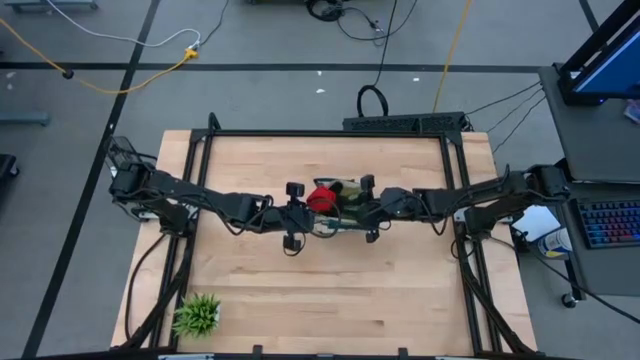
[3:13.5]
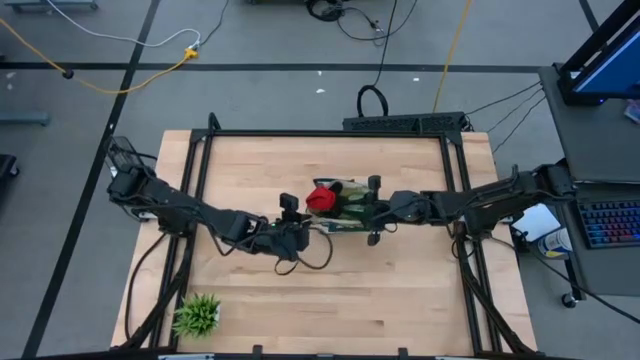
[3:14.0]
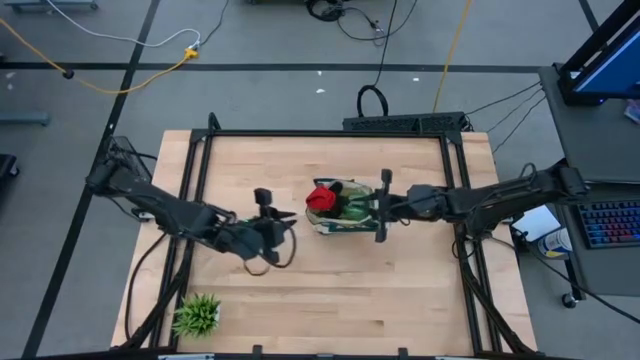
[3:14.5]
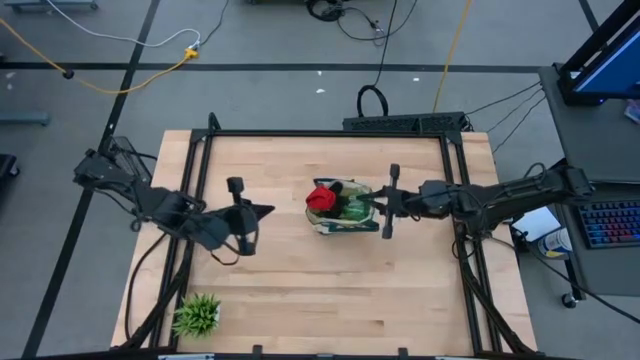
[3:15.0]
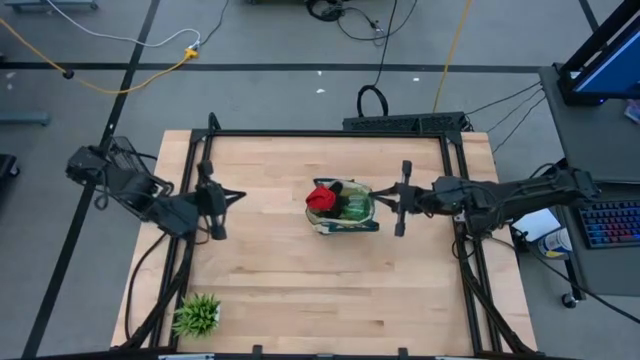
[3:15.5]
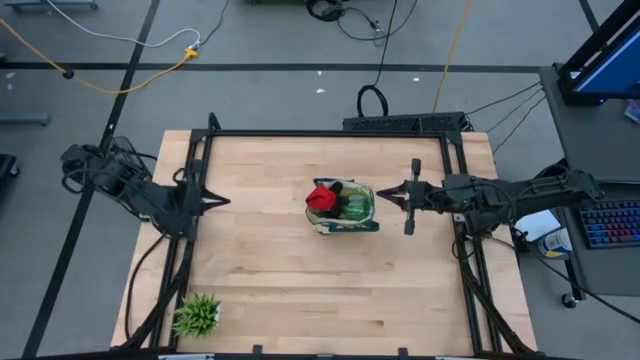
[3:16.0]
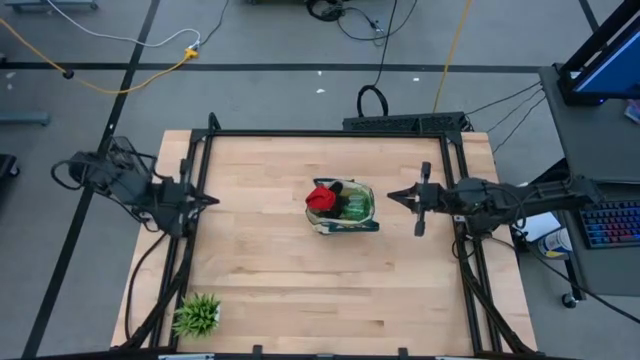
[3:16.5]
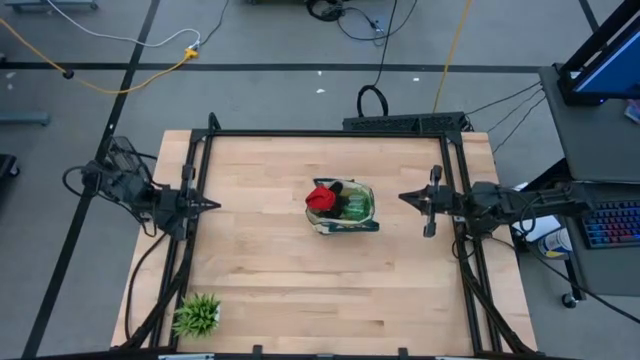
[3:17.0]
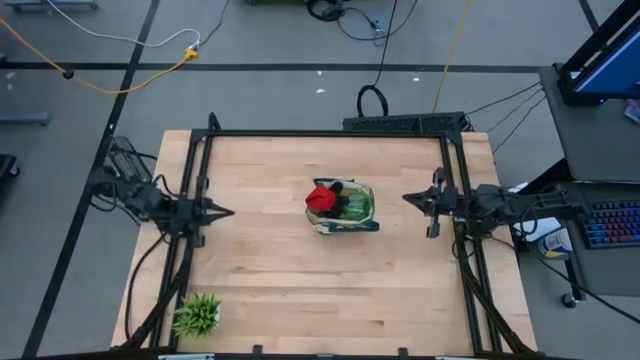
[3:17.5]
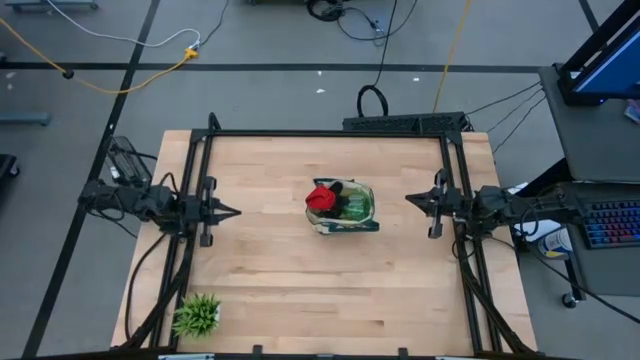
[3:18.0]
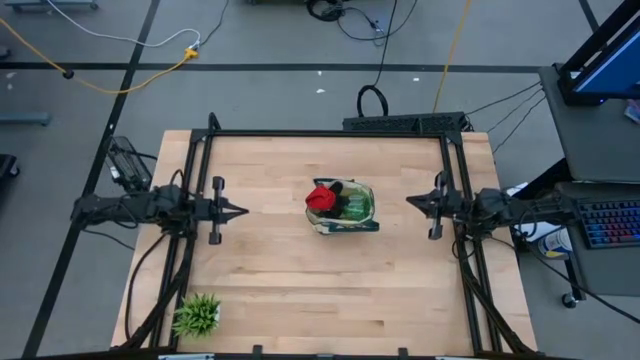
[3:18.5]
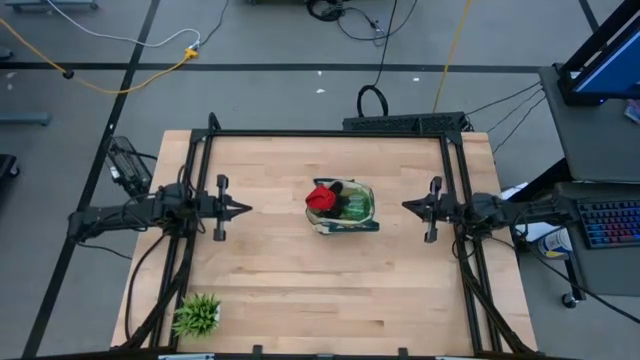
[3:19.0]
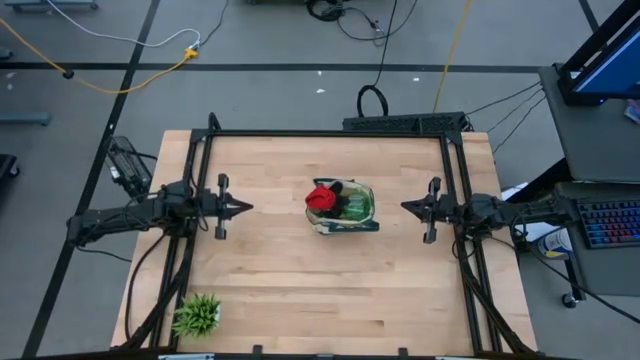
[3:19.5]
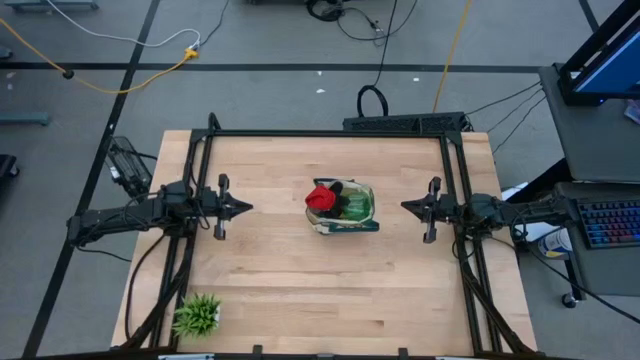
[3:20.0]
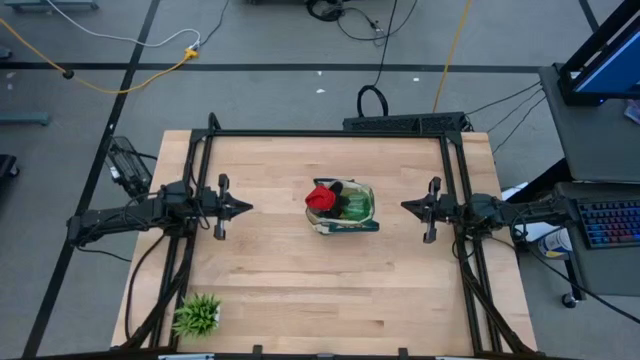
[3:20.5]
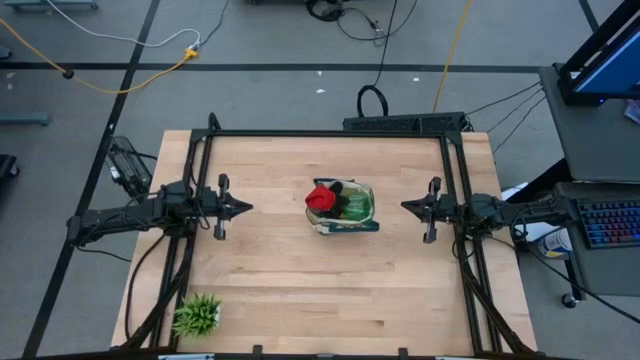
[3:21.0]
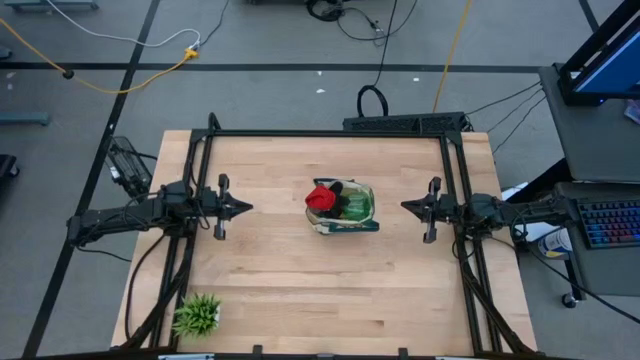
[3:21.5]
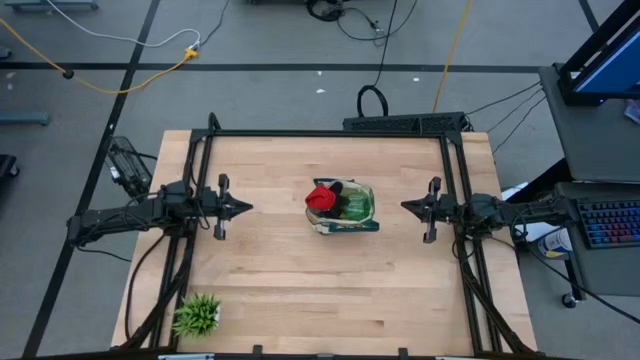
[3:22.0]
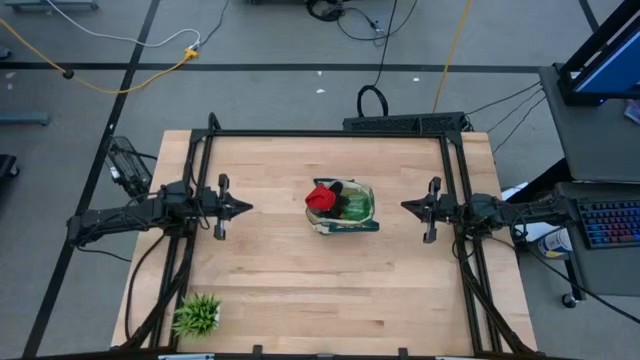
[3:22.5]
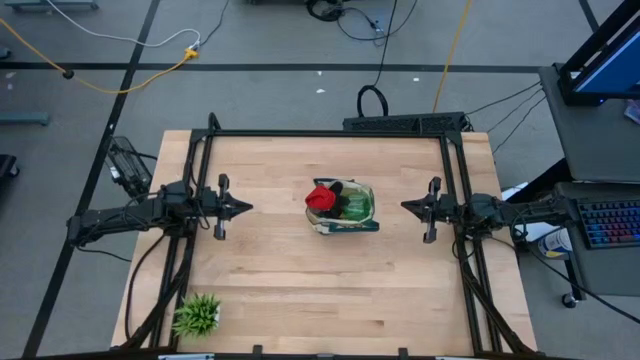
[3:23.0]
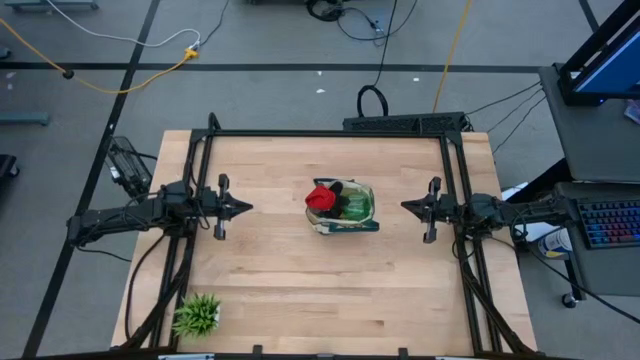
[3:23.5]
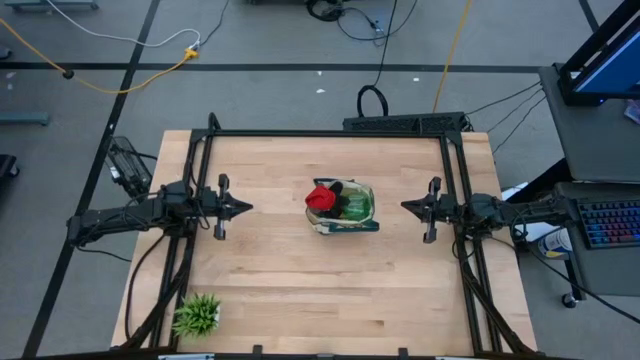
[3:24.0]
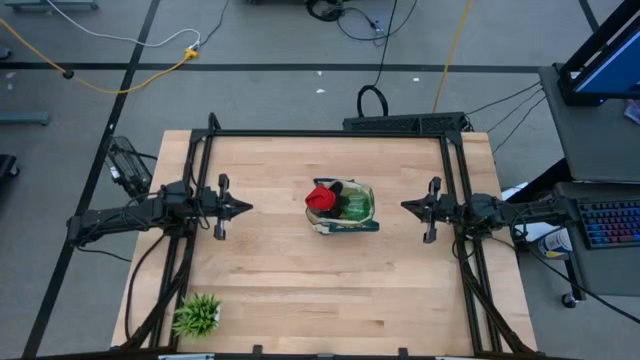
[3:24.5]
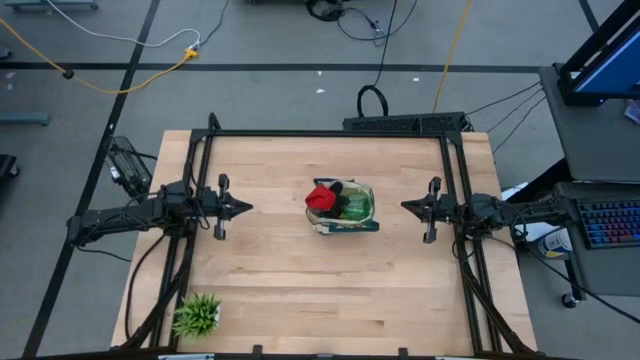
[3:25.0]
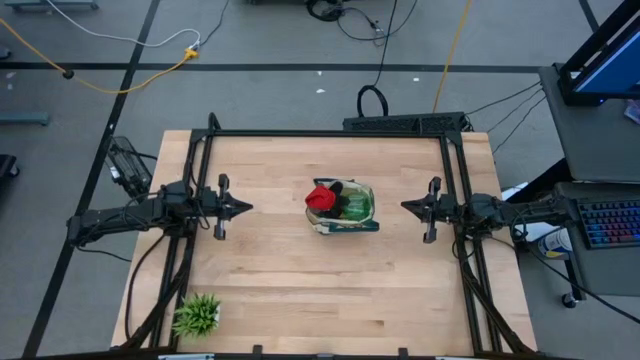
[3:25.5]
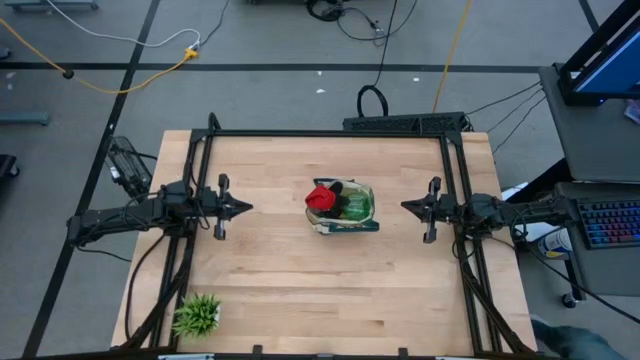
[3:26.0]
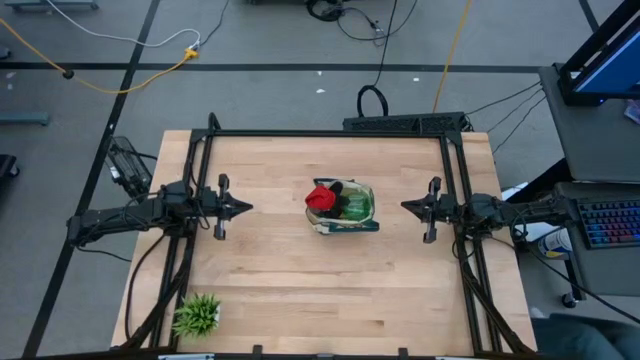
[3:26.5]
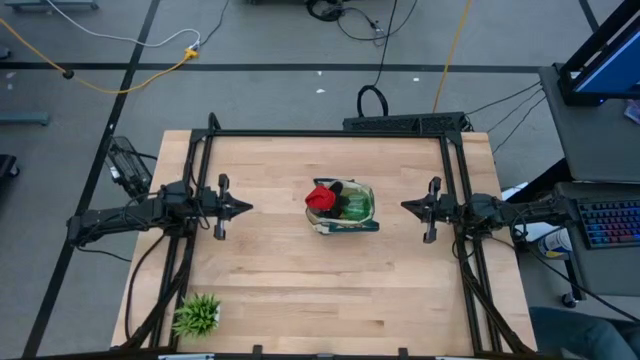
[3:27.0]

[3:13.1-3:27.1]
Task: Pick & Place Garden tools in Gardening bag
Return to Home Position

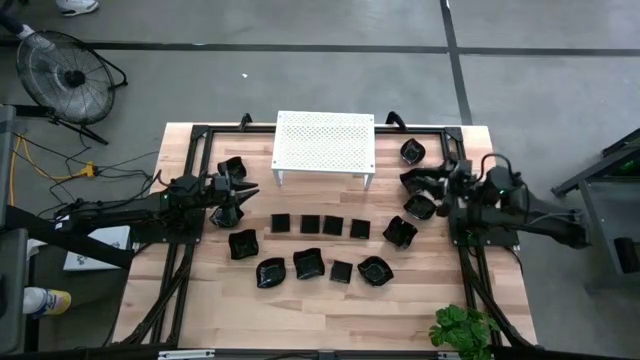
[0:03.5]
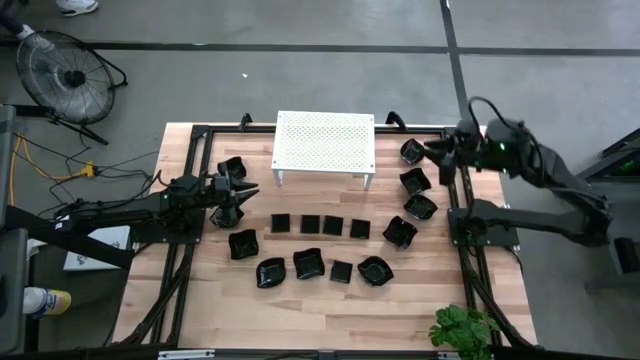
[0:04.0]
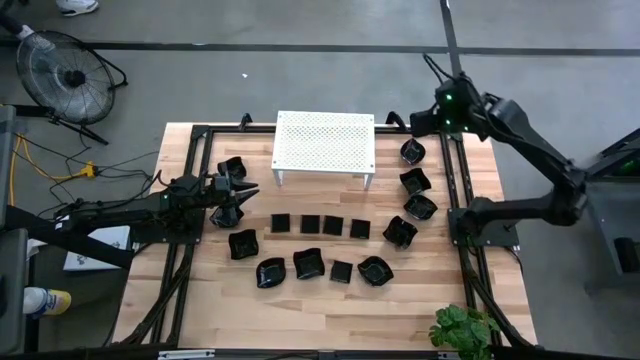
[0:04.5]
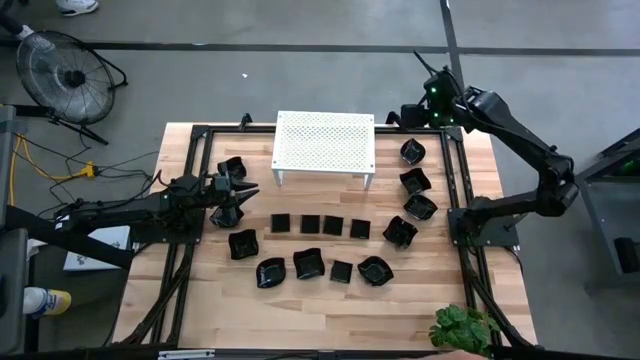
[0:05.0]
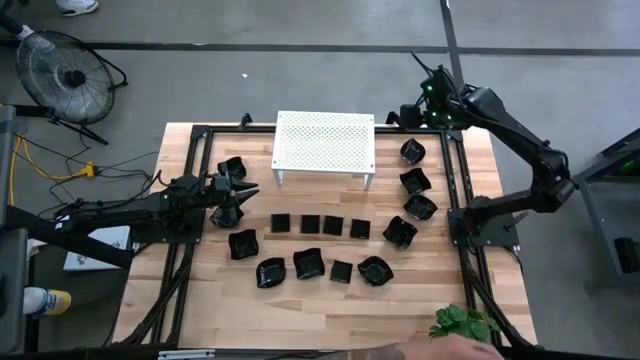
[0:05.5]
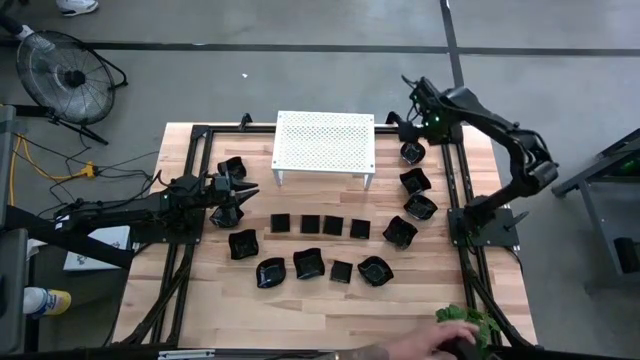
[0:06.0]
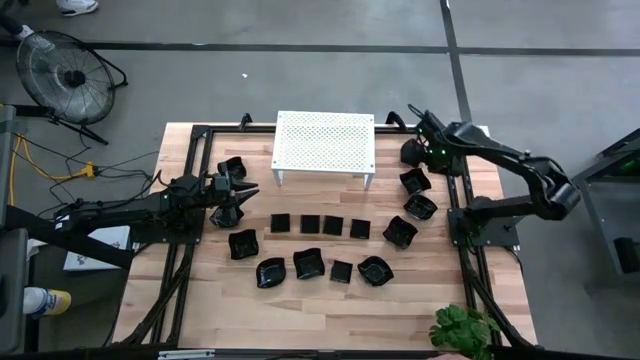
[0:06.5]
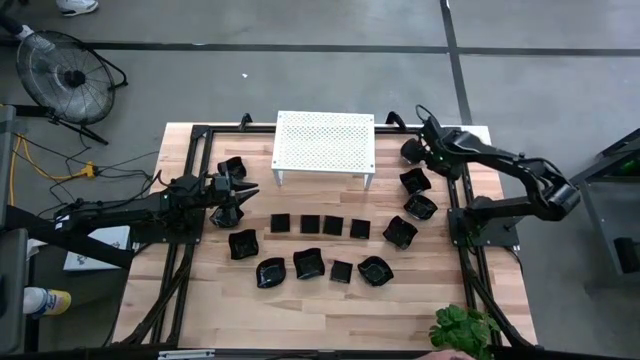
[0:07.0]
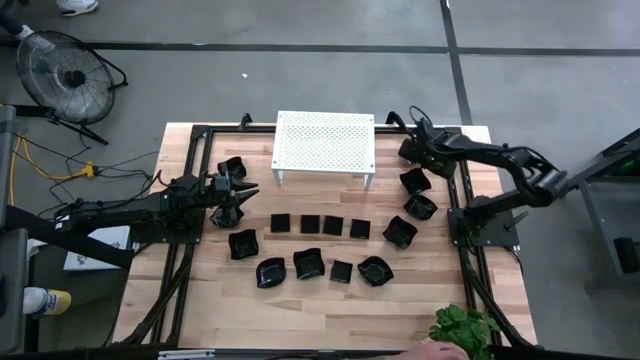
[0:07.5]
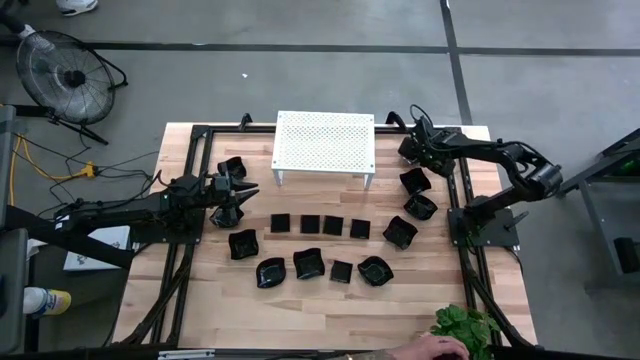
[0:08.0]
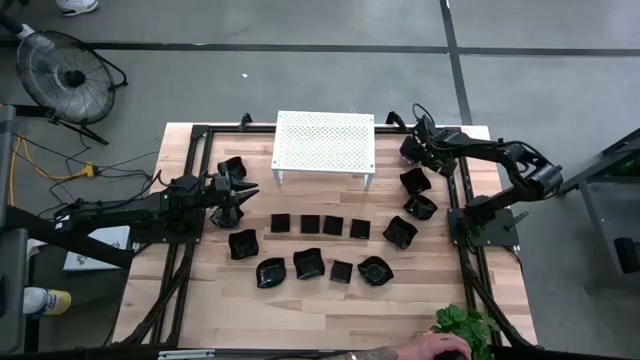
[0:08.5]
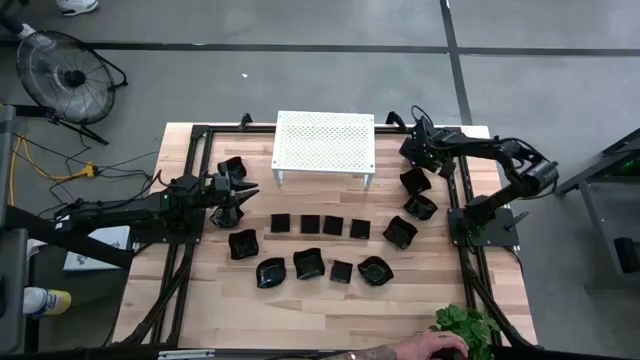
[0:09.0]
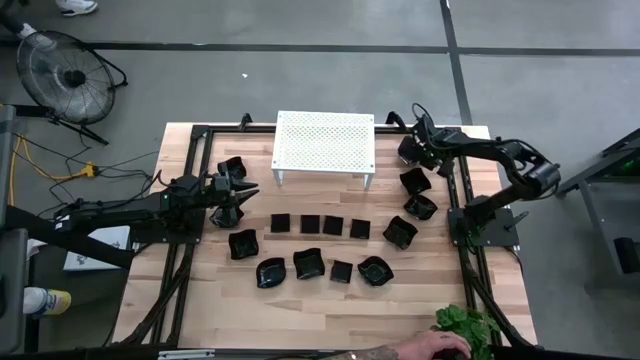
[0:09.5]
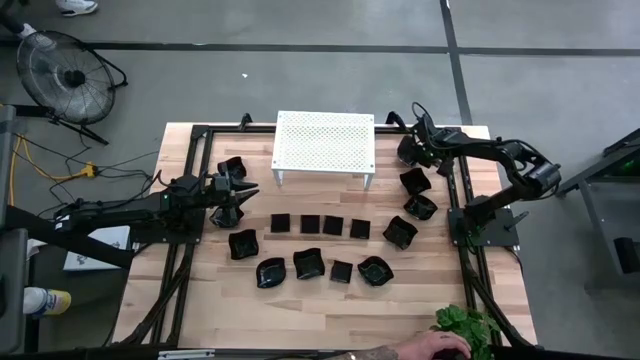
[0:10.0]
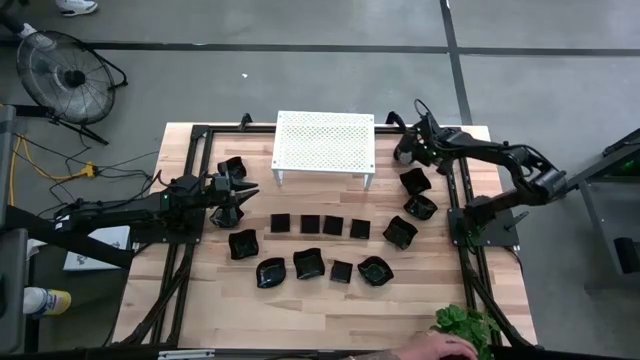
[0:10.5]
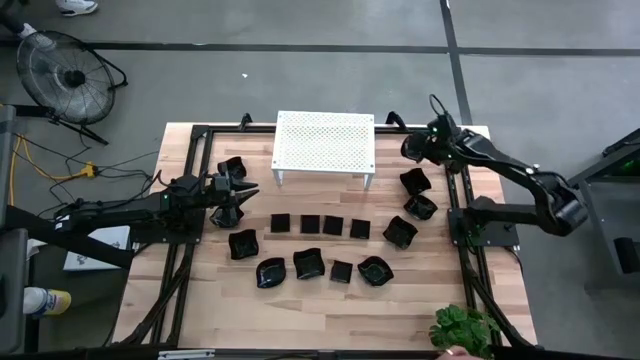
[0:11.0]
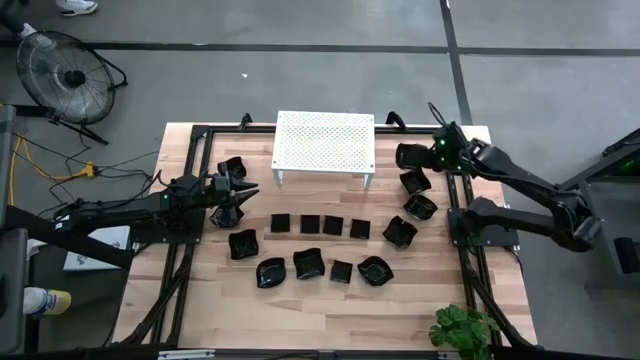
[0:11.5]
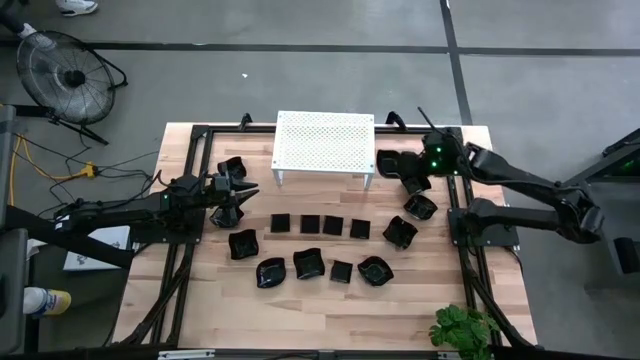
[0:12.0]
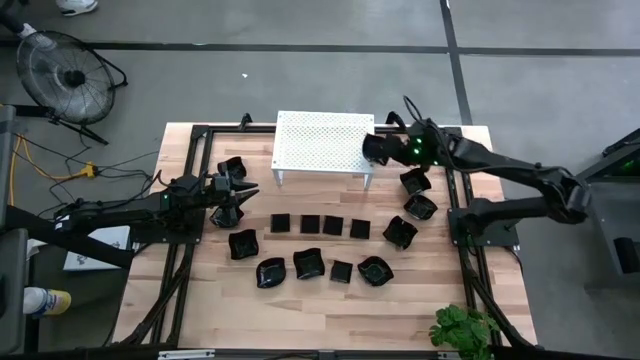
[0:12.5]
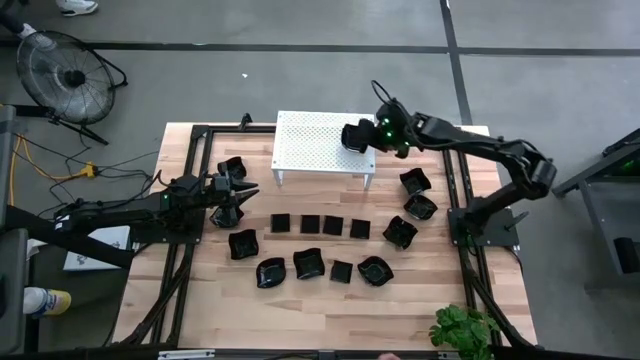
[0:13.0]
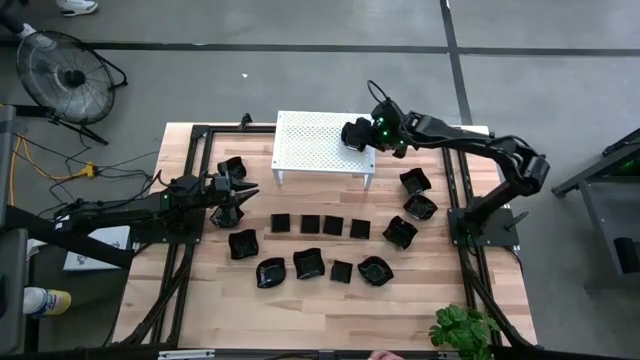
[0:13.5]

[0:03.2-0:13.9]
Task: Pick & Place Mini shaped plates
Put the leaf shaped plate on the shelf
